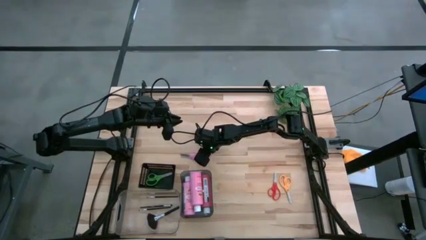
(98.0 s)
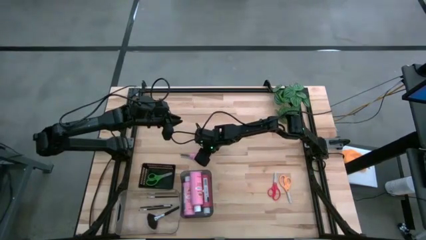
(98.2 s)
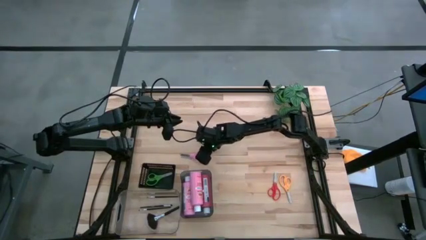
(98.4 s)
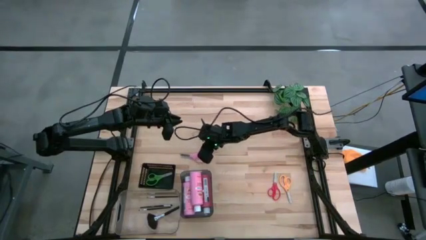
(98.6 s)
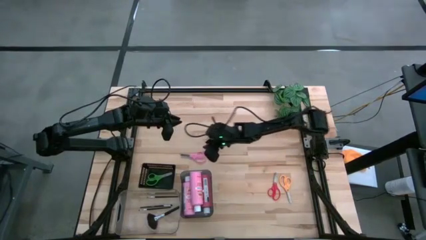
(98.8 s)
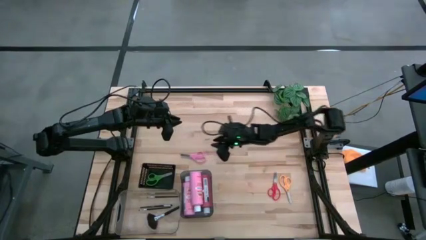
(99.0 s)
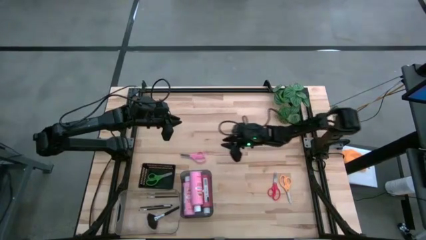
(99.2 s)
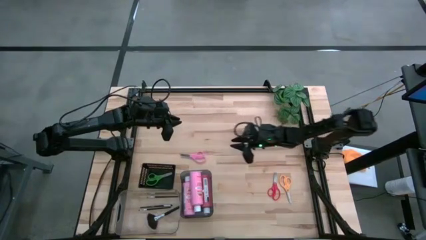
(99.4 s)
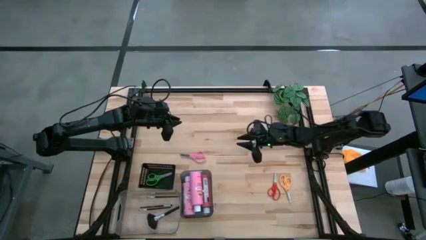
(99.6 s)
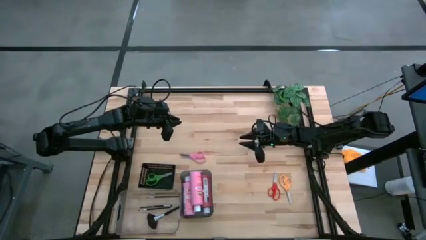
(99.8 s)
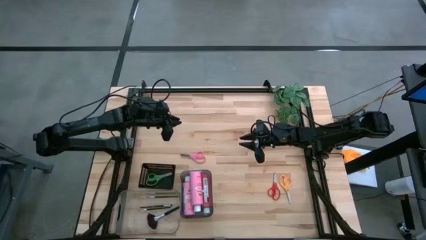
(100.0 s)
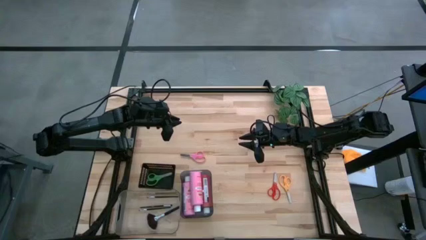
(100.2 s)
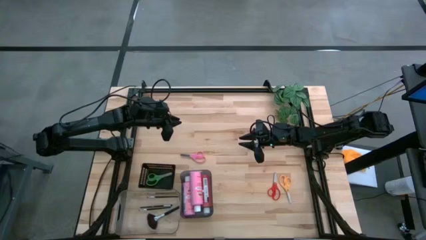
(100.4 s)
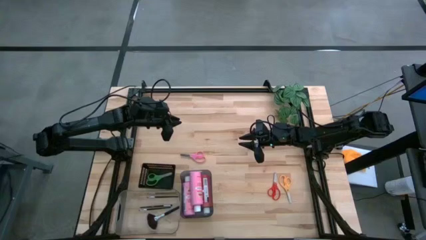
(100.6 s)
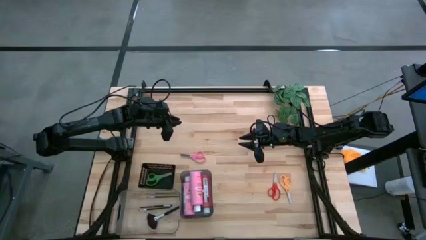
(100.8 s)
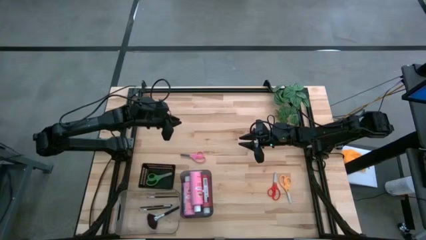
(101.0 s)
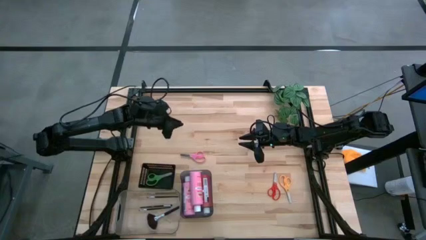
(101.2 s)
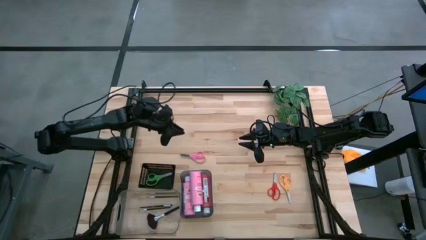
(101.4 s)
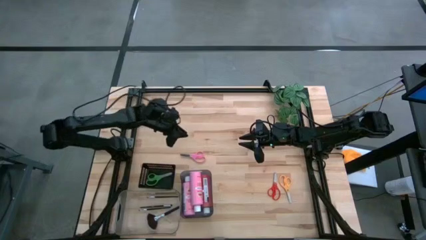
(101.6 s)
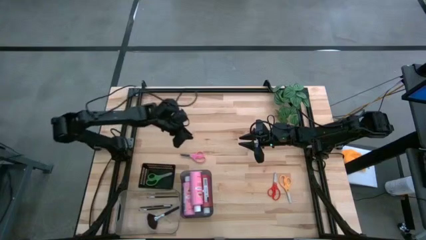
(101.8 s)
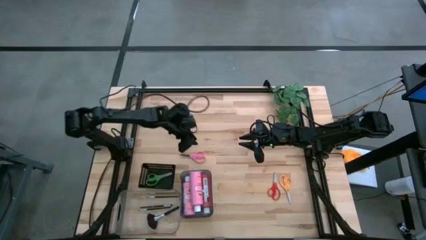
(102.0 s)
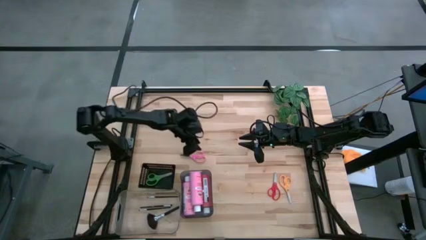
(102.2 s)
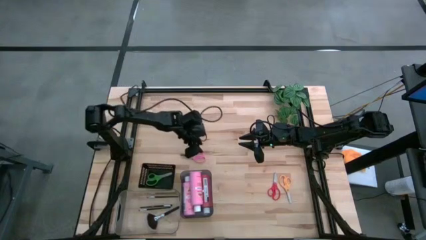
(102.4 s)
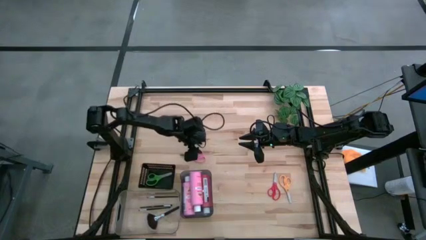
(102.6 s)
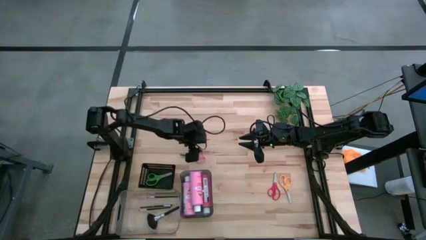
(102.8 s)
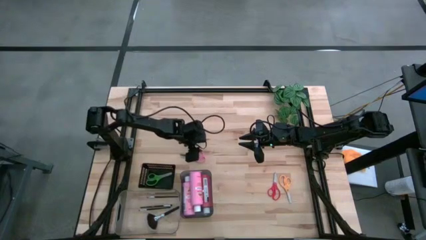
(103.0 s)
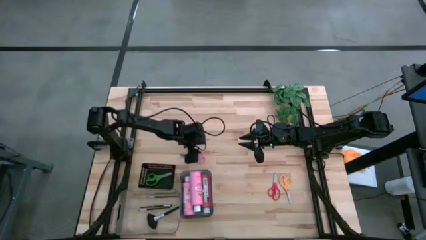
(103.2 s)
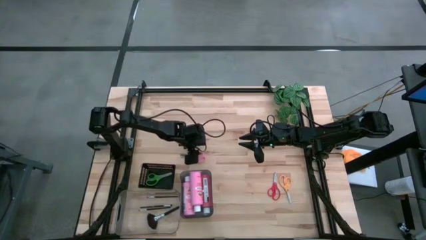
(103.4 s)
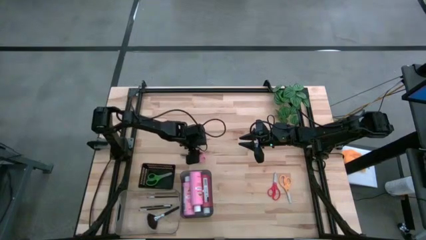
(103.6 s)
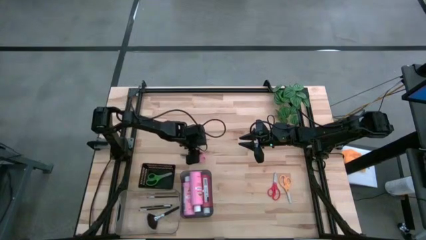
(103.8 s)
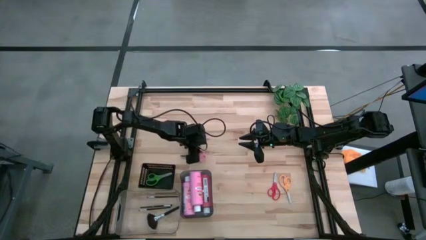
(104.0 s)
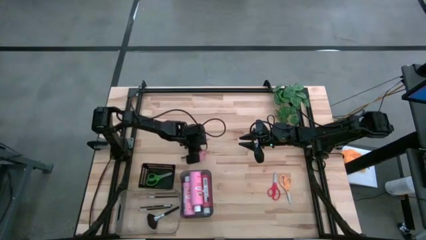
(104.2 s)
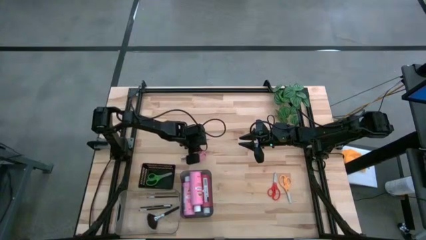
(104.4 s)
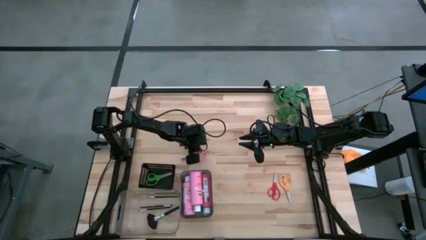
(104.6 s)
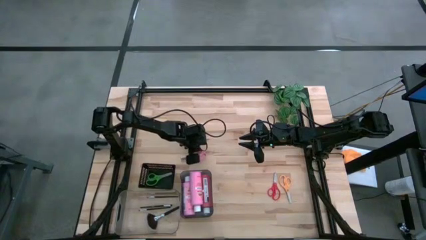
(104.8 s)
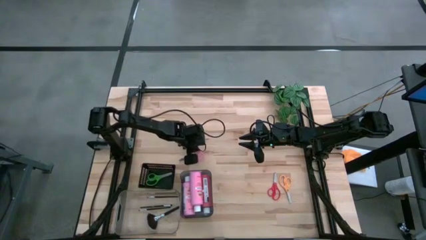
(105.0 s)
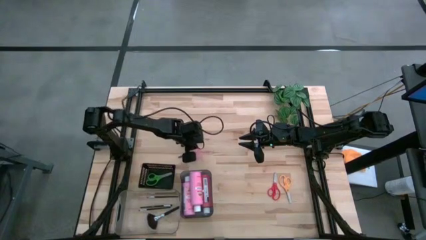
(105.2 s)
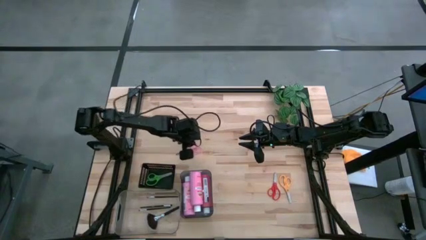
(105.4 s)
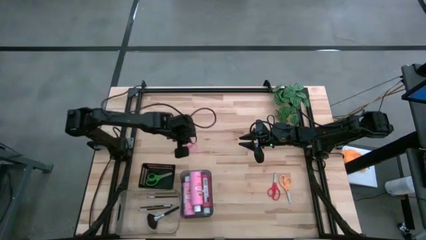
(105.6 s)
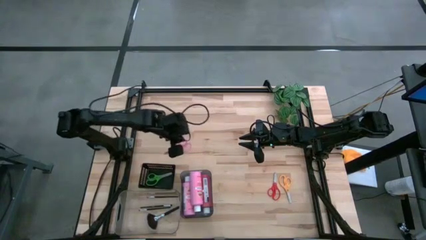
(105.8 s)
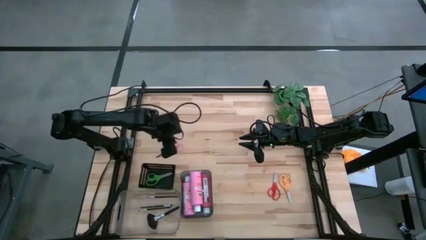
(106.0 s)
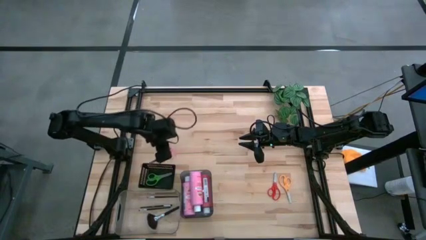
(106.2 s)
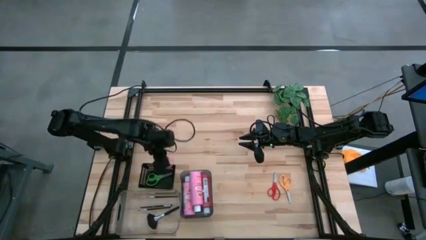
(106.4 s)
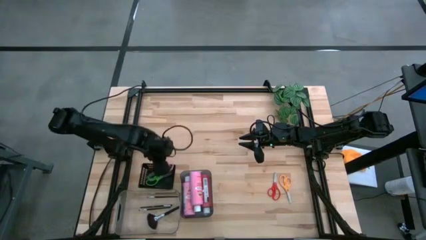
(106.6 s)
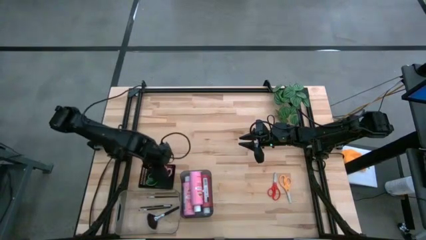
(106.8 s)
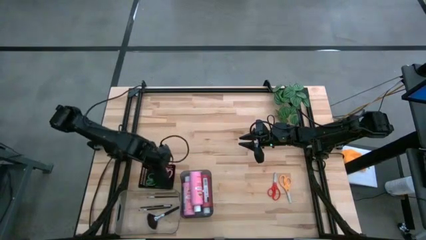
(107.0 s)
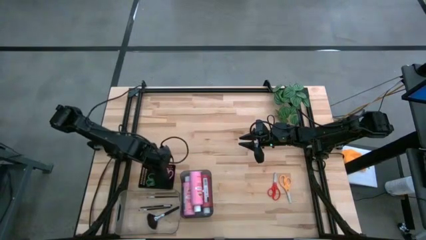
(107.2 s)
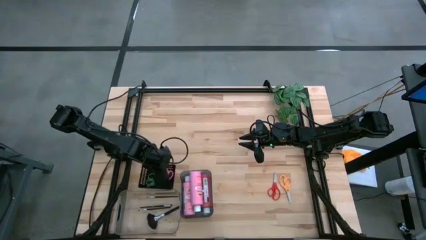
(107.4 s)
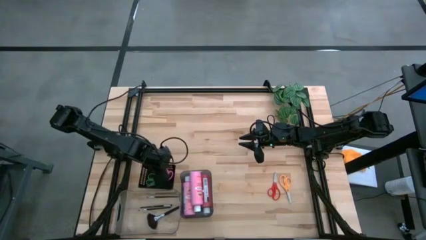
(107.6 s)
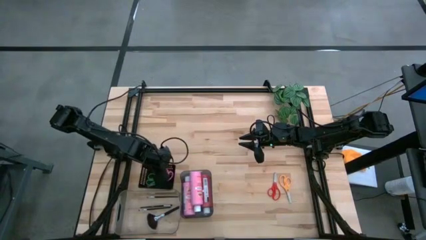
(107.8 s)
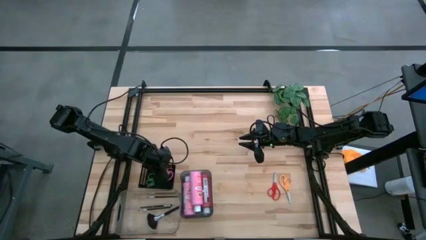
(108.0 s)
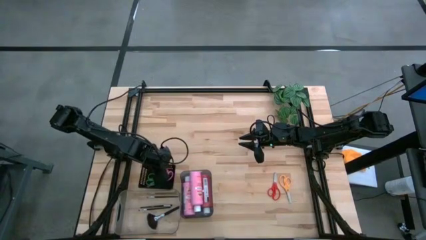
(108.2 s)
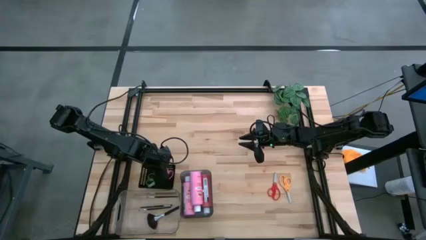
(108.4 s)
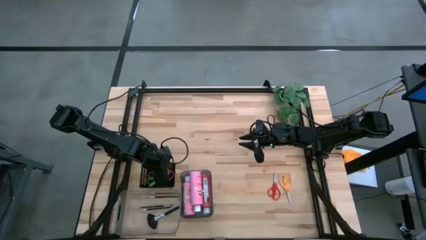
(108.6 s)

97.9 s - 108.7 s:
Task: Pick & Place Paint Supplies
Put the pink scissors into the black bin

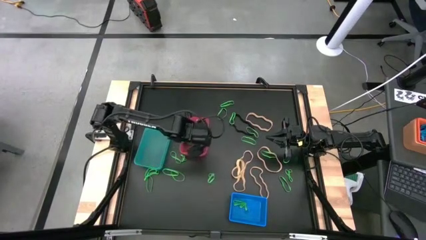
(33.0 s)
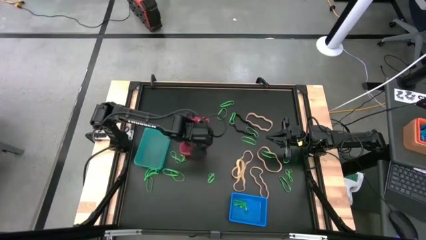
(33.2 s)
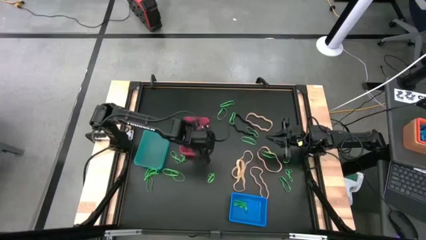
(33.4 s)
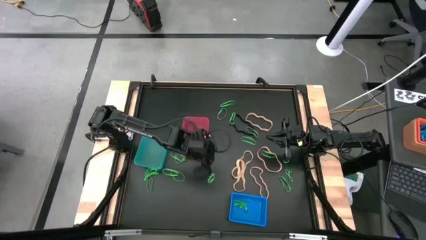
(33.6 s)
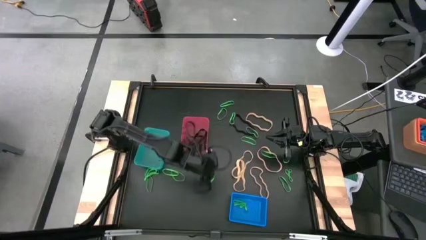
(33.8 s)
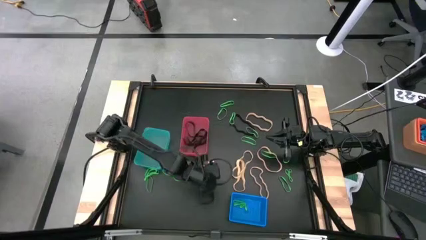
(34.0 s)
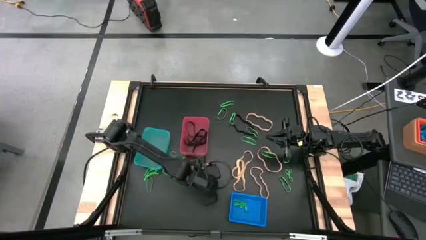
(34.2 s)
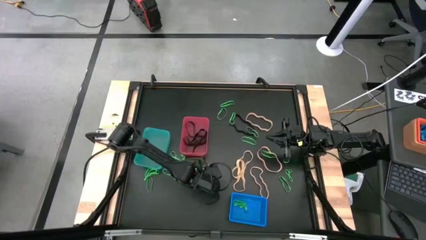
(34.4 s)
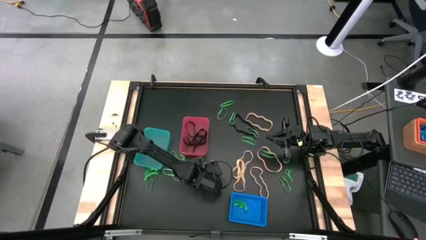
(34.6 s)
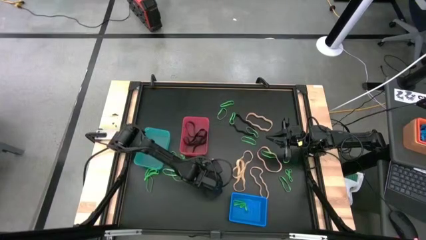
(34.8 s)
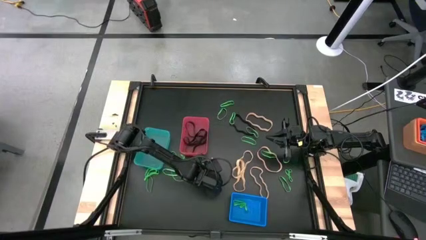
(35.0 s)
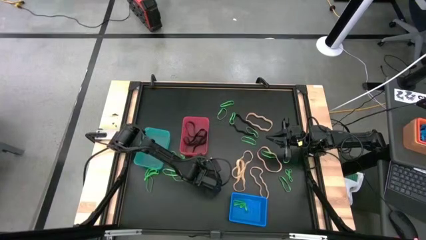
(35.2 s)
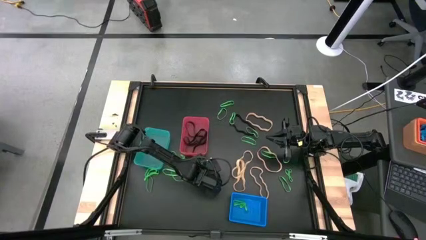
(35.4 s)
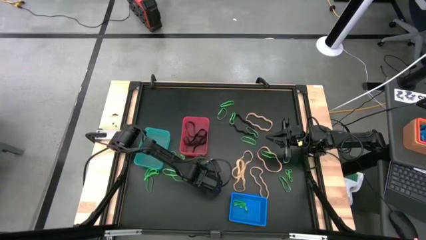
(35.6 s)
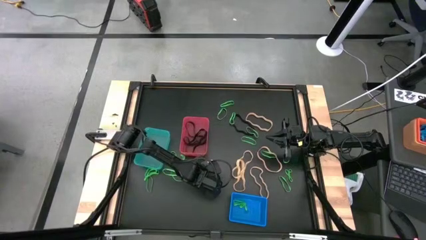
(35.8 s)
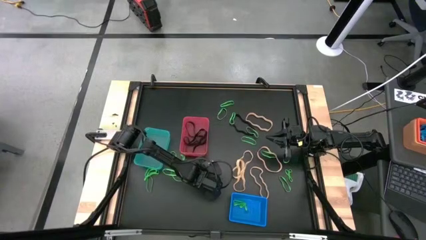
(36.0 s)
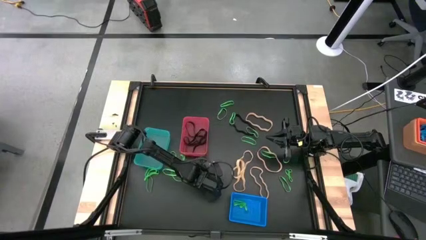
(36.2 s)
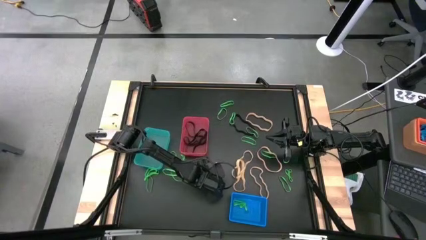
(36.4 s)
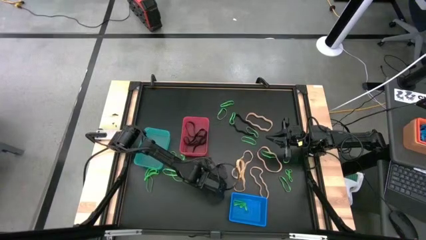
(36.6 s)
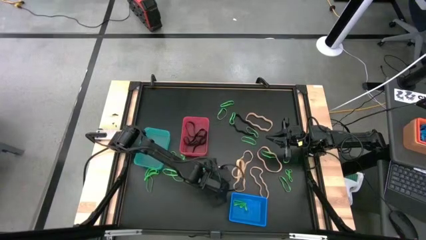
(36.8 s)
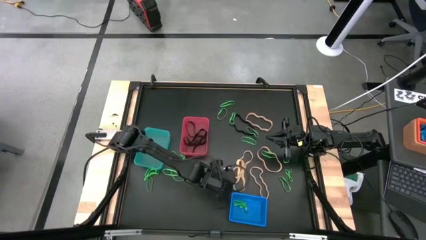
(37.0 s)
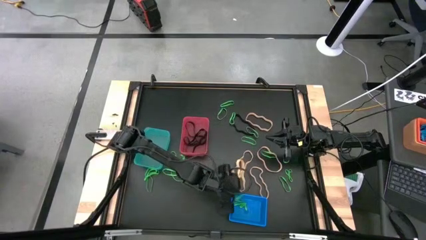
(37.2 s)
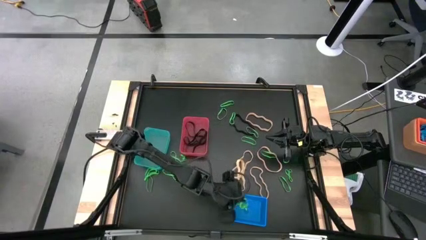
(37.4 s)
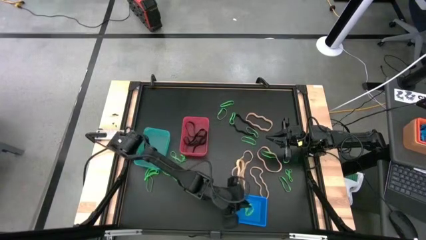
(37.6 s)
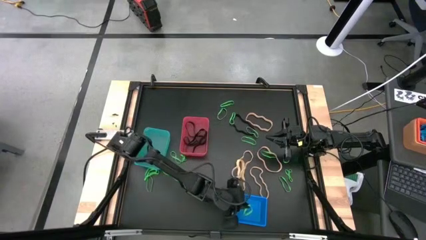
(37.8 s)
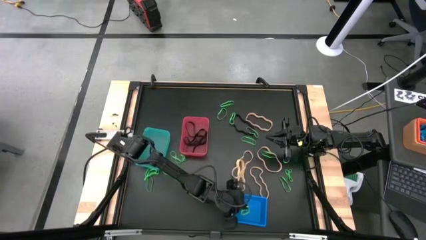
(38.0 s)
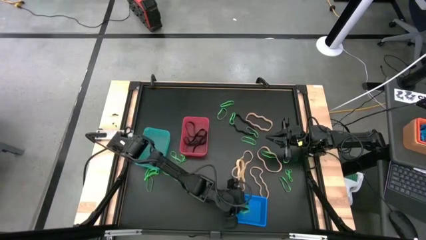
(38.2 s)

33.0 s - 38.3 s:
Task: Sort rubber bands into baskets
Put the green rubber band into the blue bin
